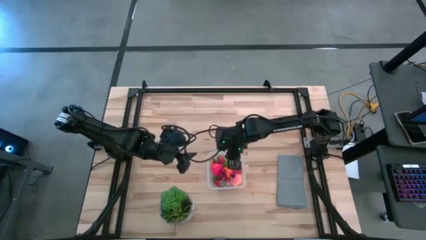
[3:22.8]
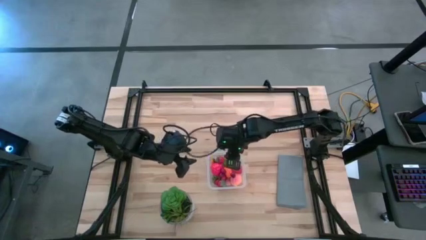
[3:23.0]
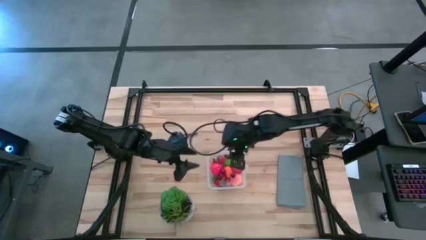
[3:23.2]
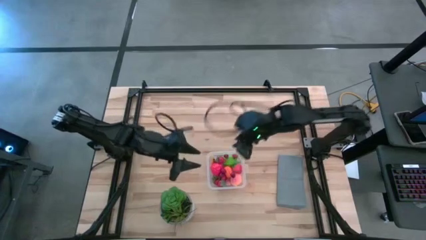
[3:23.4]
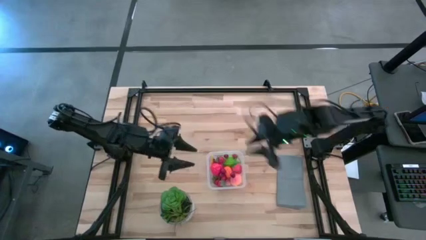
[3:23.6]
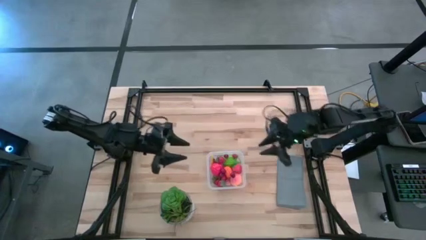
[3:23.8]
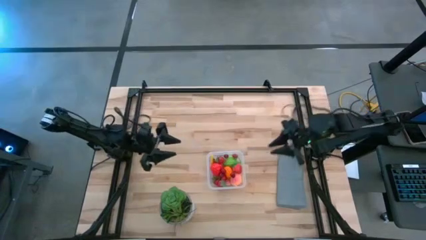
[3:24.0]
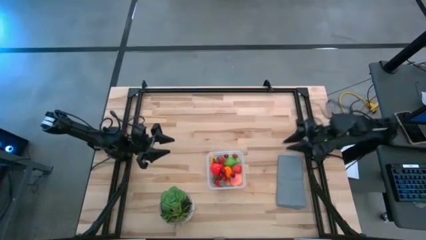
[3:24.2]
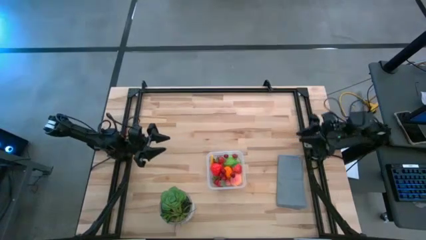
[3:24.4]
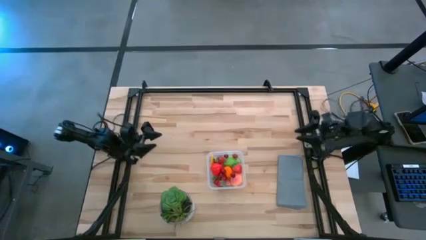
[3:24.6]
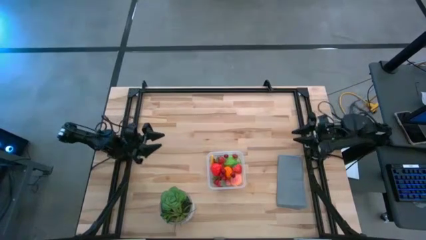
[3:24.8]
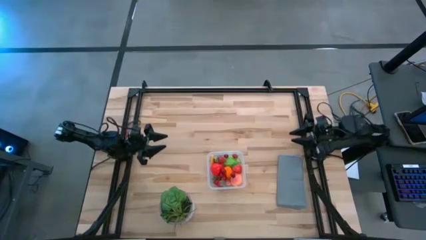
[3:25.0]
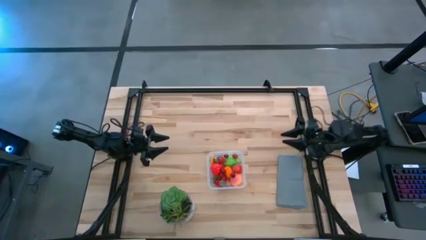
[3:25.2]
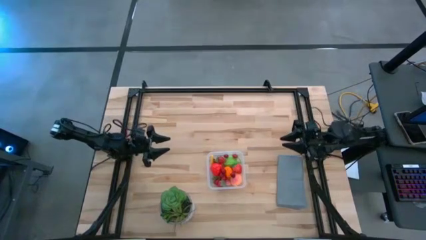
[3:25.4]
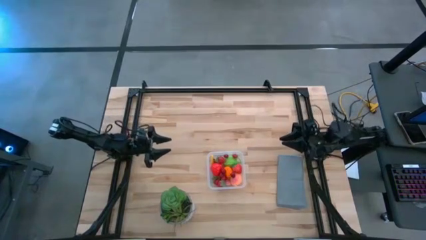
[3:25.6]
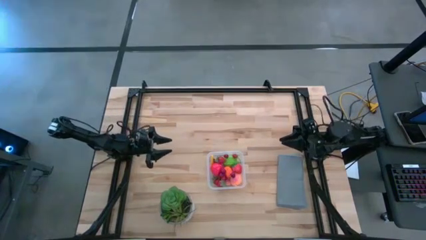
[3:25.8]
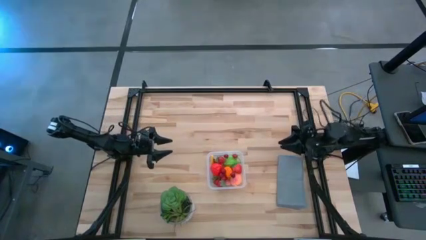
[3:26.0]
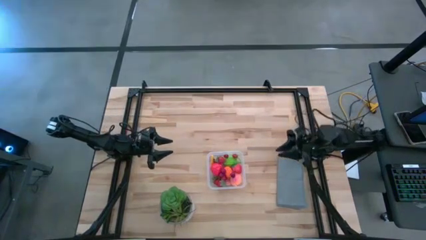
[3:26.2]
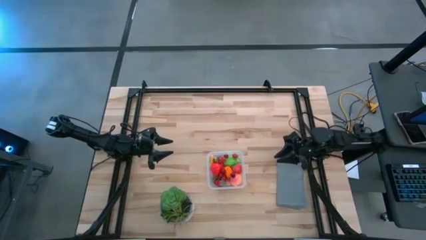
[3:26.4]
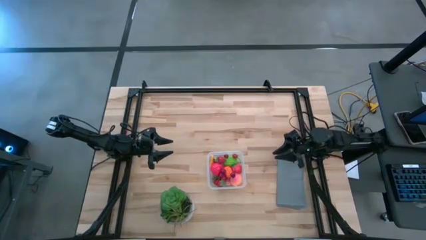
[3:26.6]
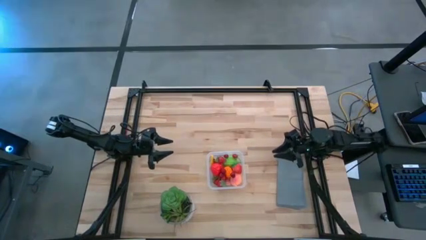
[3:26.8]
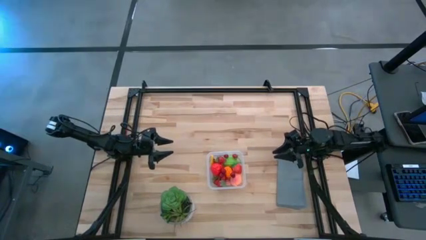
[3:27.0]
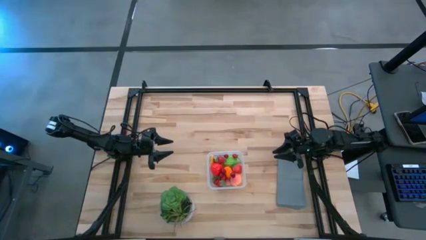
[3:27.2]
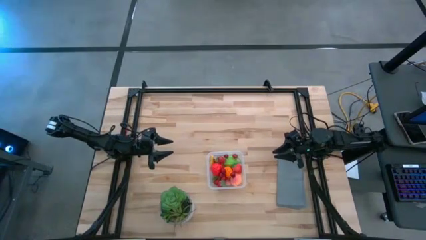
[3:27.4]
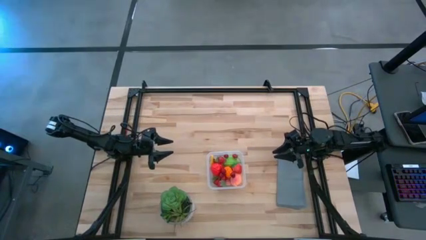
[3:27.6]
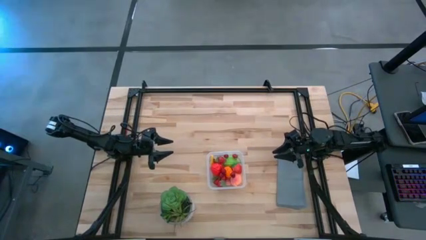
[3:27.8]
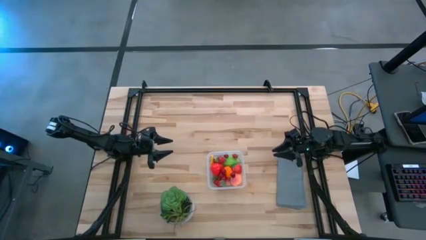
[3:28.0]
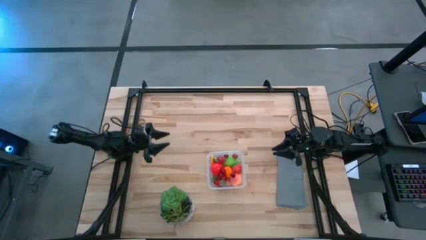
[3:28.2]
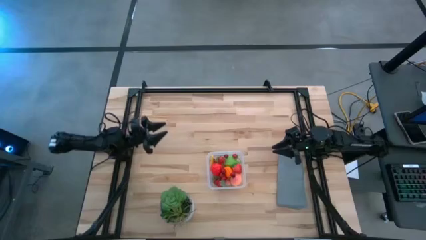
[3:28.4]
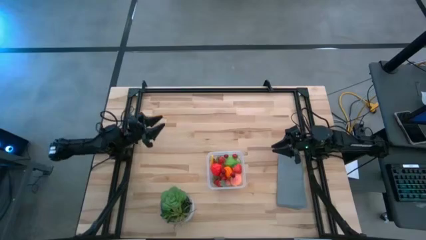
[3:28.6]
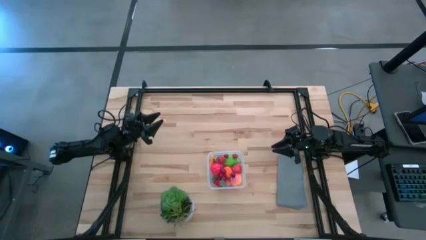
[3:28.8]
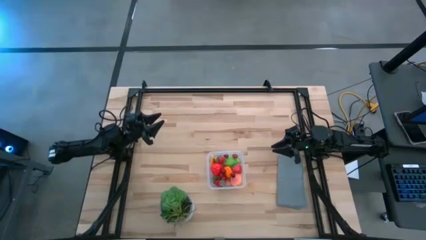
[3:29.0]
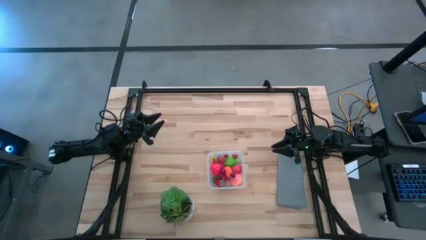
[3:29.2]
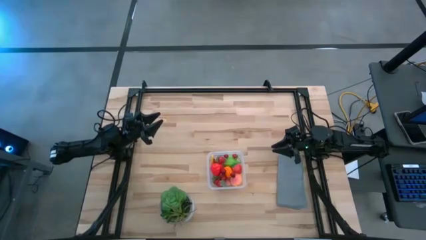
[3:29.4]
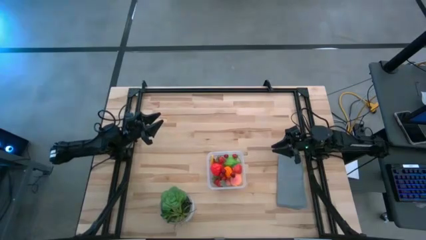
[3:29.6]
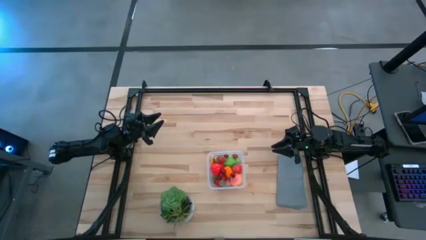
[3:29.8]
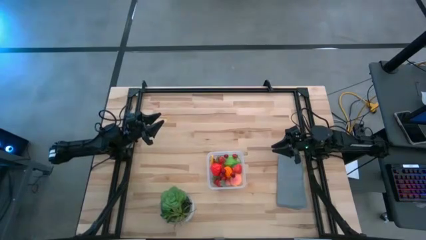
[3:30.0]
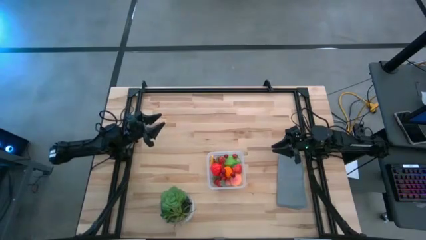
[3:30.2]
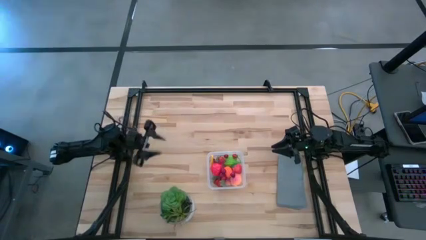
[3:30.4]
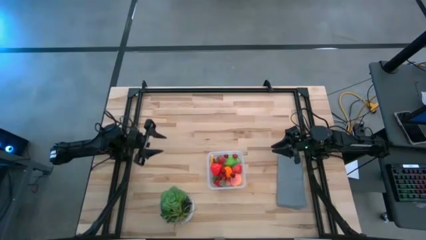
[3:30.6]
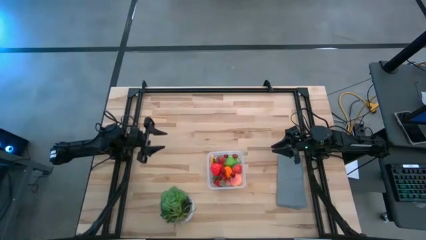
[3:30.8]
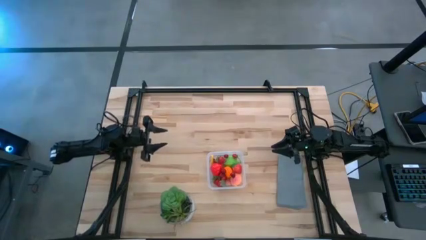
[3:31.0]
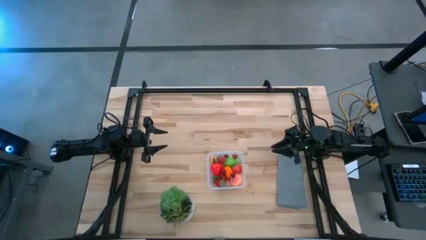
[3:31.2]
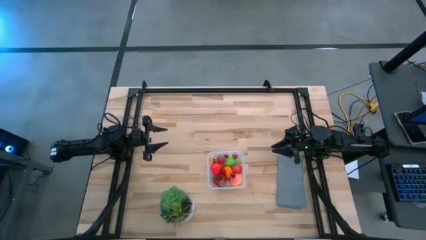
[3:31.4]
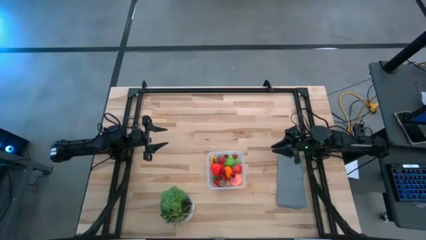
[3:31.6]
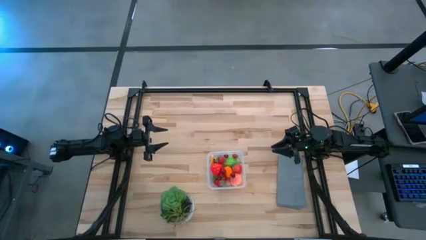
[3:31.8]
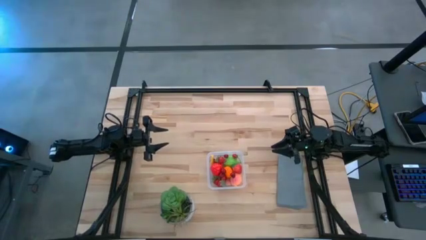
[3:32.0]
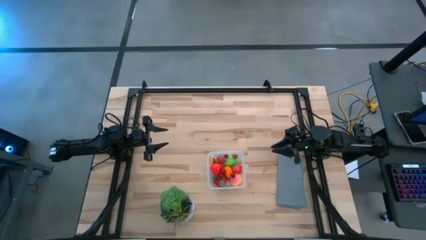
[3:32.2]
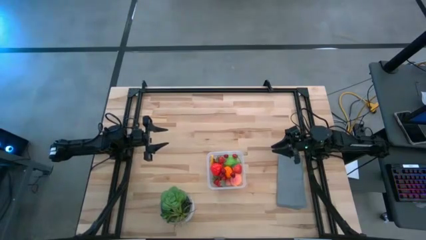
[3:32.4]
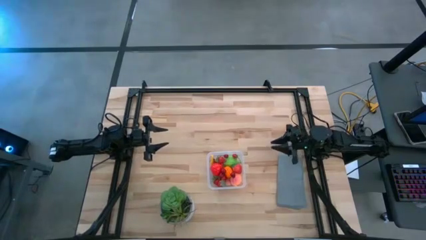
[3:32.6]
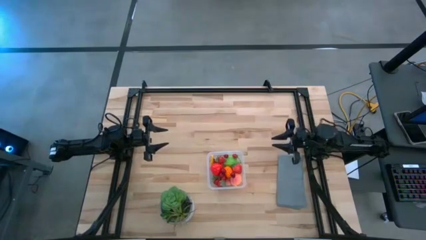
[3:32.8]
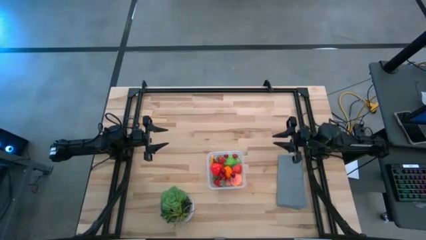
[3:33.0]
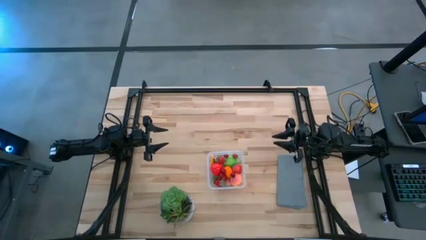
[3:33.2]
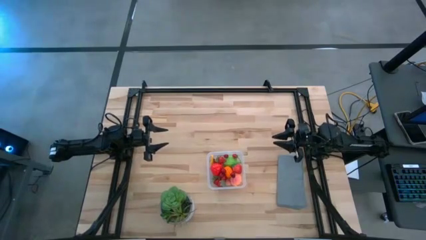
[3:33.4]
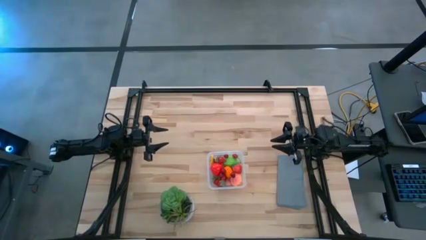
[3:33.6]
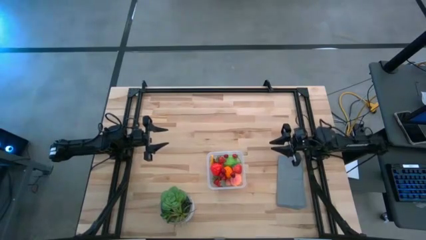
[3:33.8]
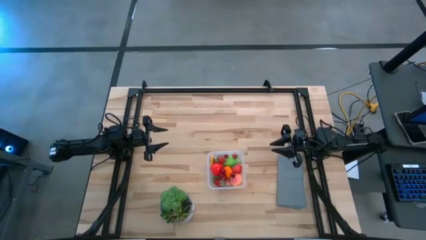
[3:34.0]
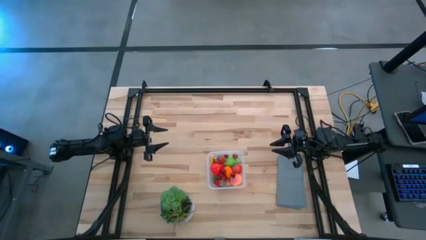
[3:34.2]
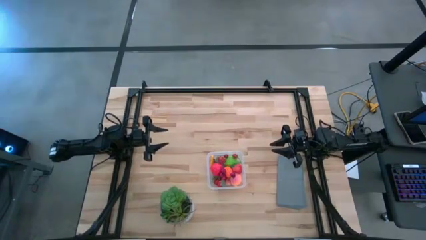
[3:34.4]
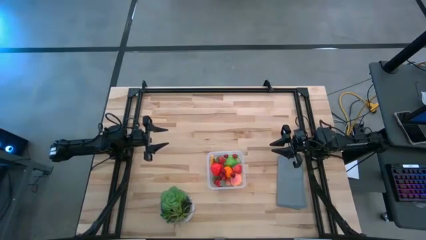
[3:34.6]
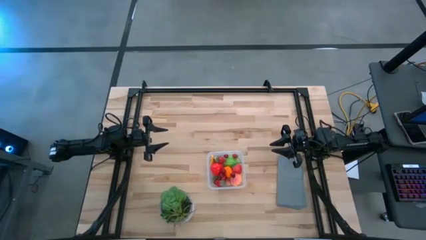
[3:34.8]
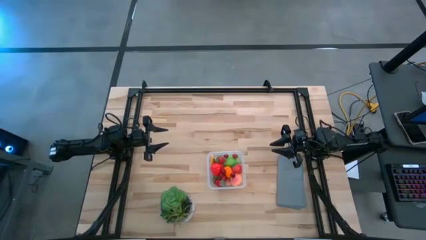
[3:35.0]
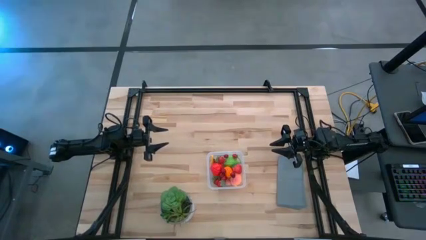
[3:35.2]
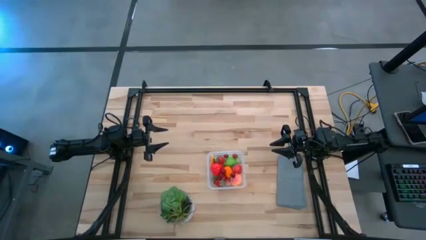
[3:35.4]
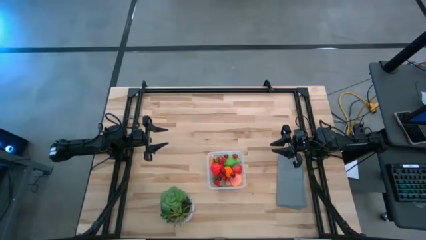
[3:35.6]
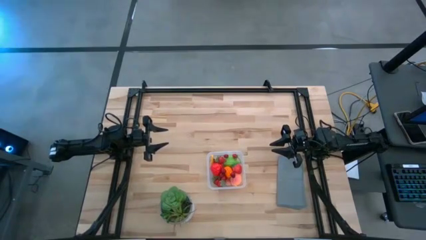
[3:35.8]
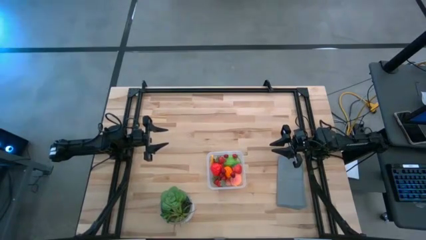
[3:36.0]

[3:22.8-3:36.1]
Task: Pick and placing Produce into tupperware
Return to Home Position
